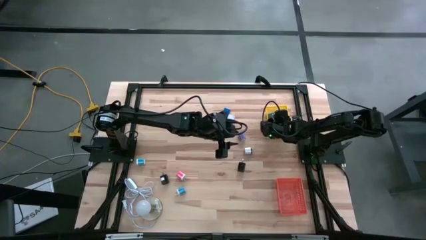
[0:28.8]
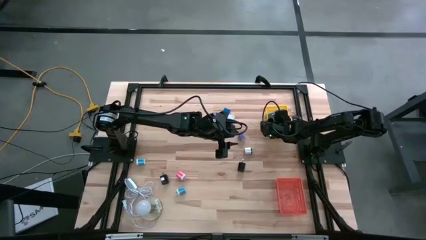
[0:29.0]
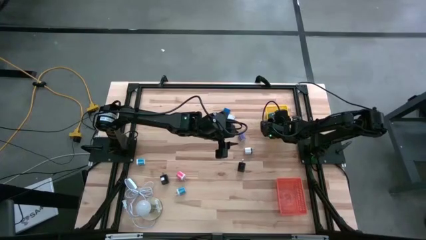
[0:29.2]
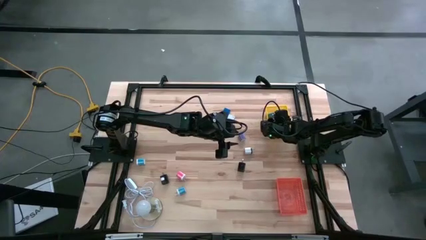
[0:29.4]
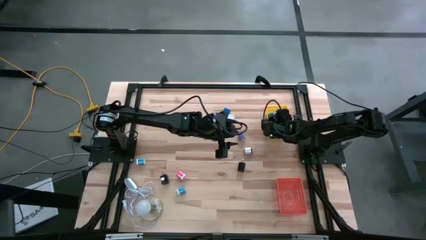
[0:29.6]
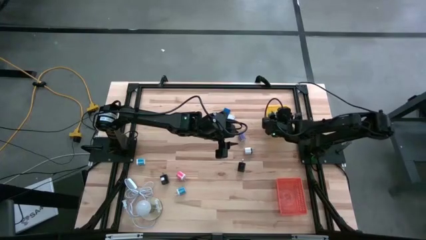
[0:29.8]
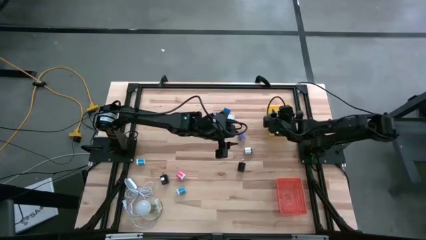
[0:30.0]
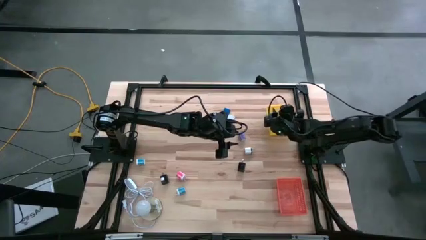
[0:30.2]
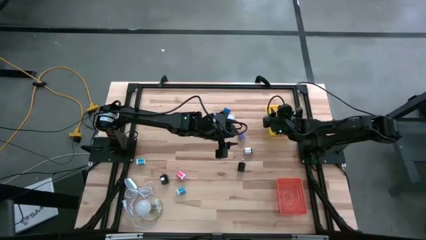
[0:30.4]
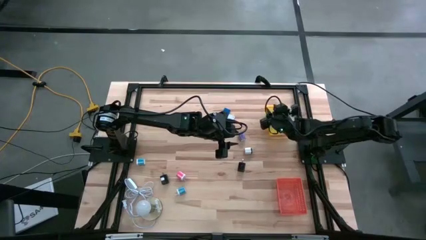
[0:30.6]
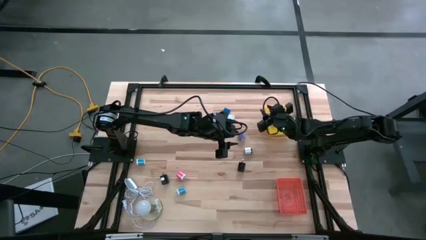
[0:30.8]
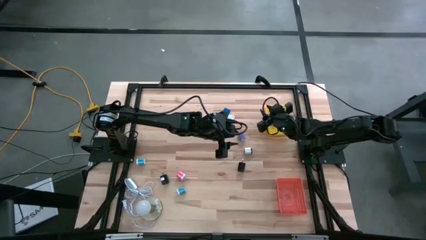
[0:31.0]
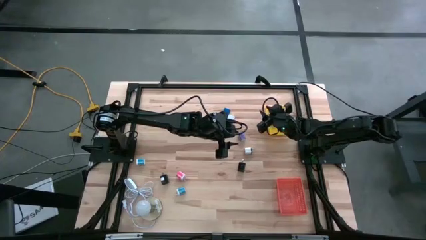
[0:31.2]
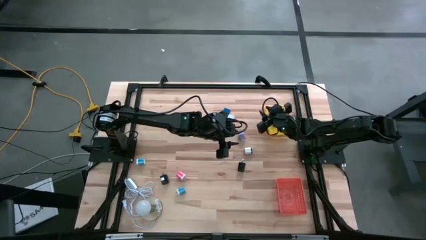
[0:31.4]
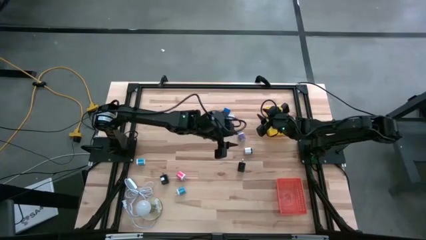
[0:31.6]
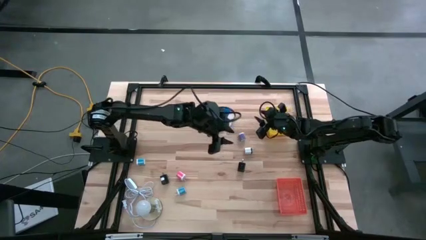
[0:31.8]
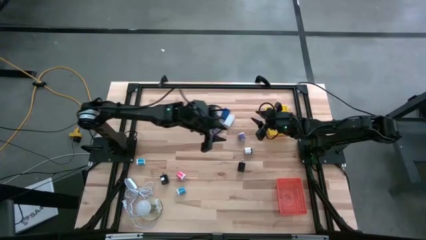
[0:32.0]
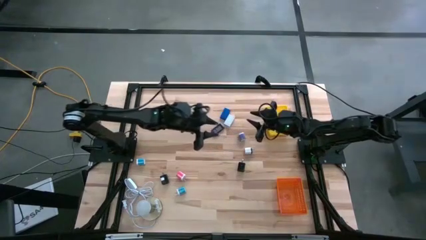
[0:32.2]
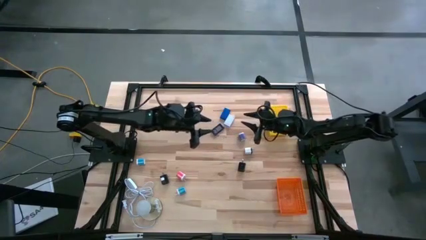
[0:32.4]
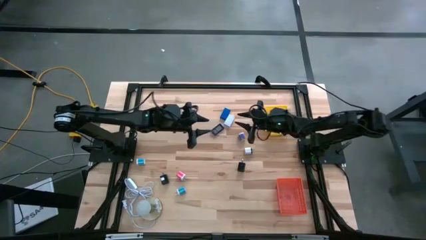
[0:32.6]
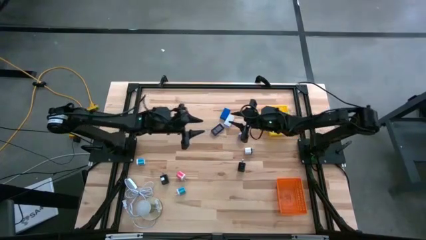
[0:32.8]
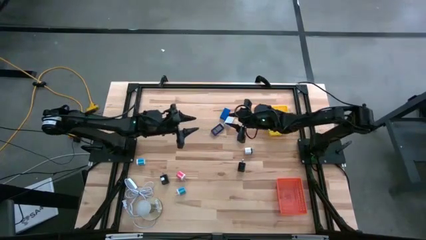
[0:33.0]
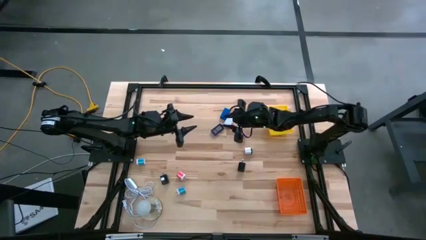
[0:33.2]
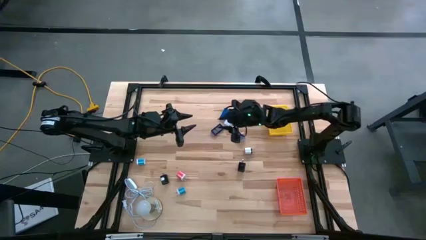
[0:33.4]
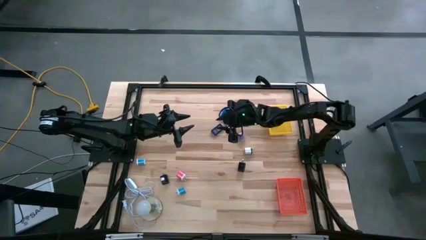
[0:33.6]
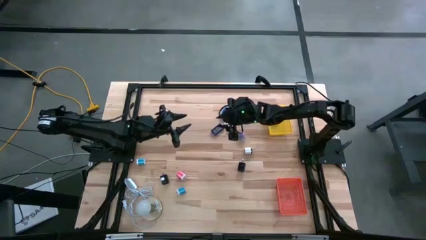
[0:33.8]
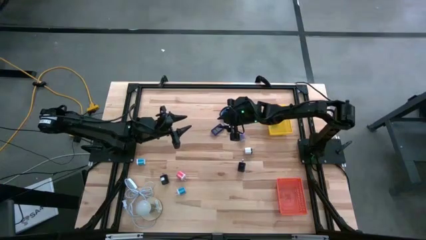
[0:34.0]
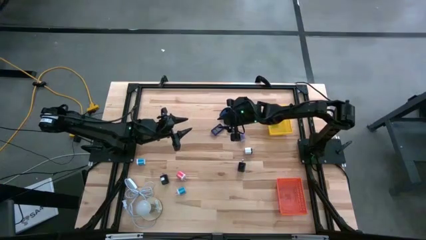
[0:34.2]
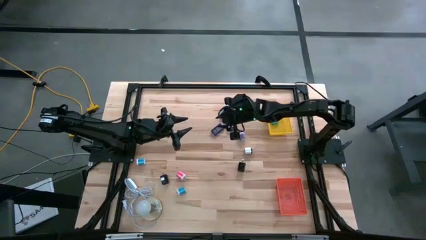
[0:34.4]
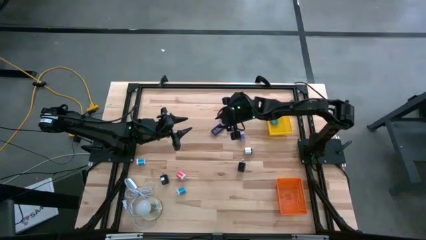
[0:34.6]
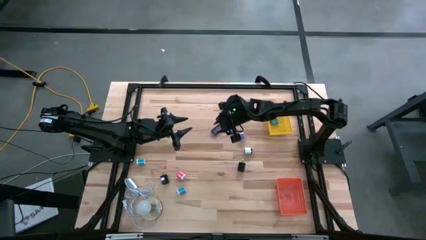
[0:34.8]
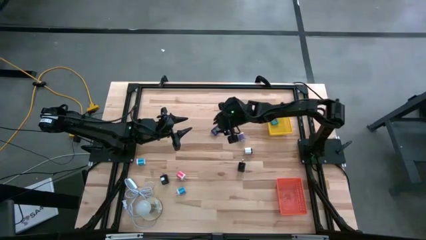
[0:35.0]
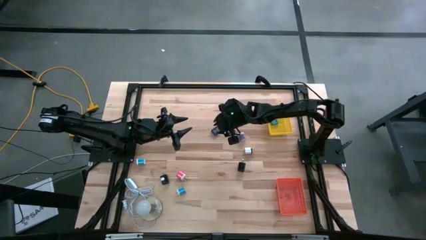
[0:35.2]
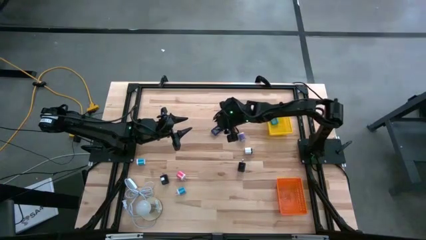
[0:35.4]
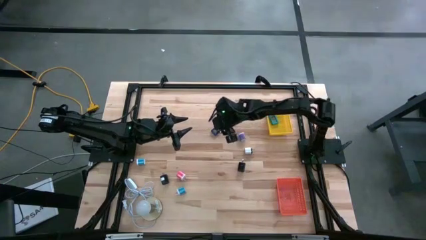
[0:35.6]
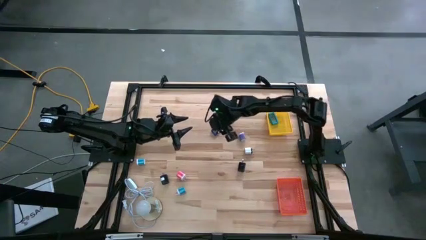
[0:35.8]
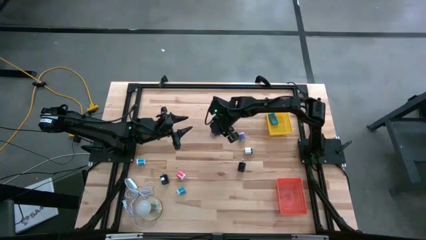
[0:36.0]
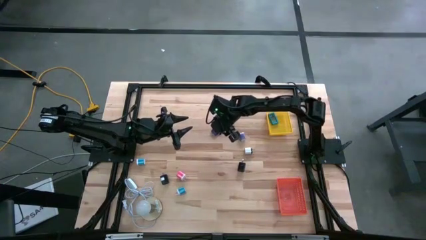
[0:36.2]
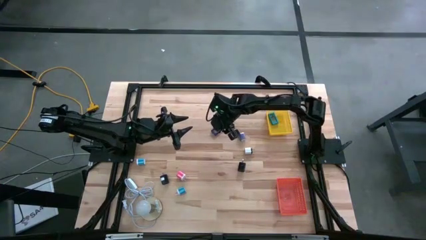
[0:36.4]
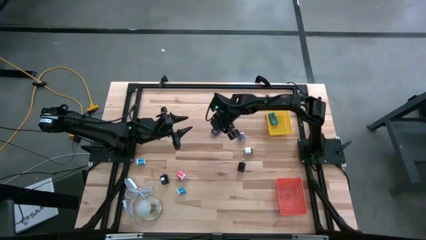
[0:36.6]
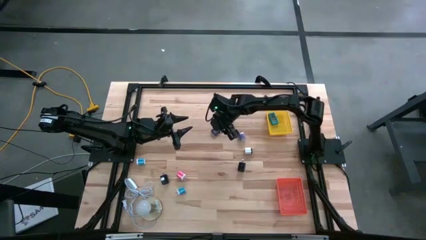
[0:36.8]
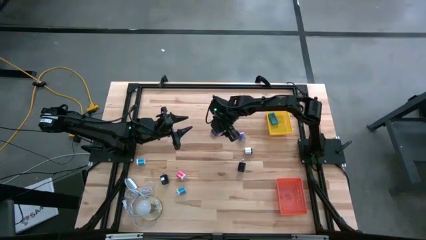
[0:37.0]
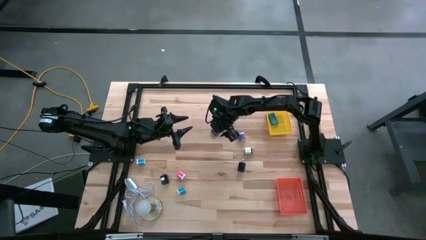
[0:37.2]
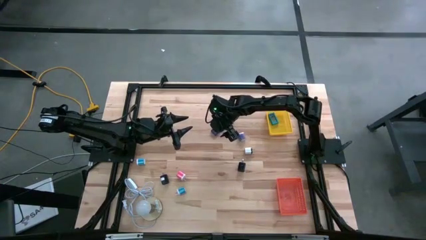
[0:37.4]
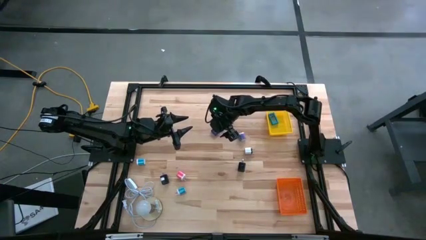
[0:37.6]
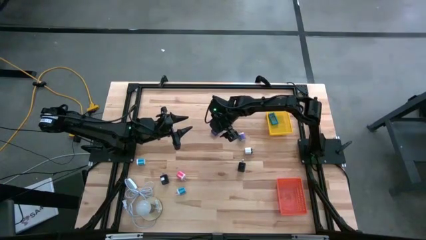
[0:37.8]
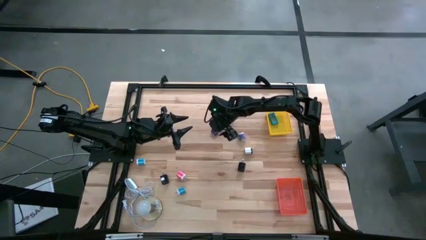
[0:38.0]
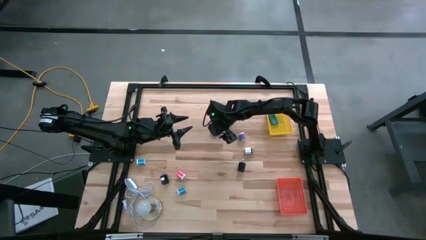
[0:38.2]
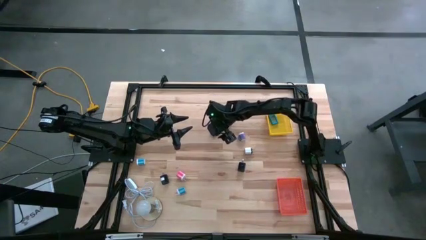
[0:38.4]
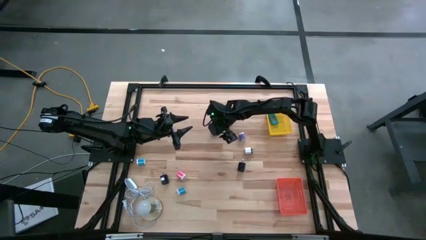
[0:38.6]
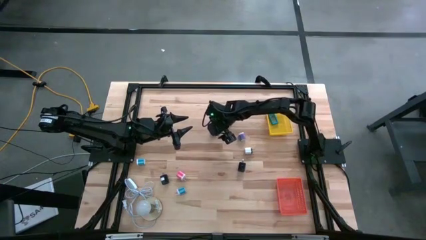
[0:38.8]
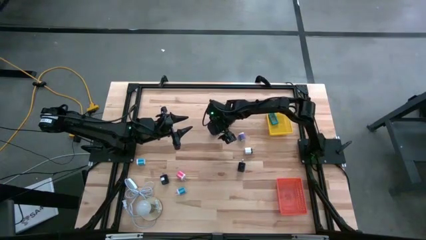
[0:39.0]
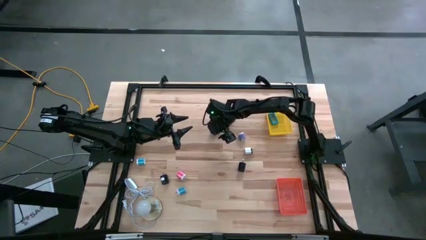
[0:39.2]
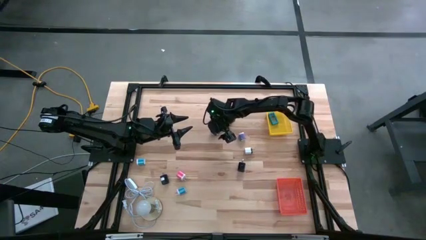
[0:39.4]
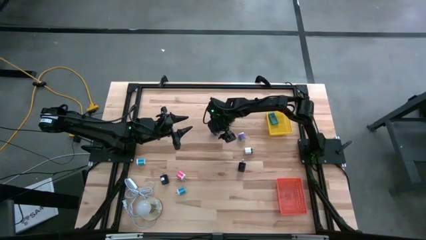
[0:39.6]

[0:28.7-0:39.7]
Task: Pick & Place Office items
Put the dark blue digital clock into the yellow bin
